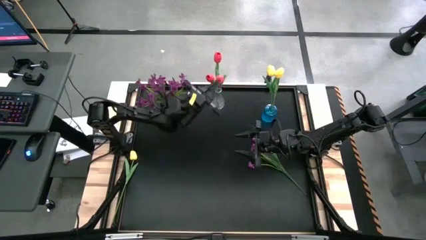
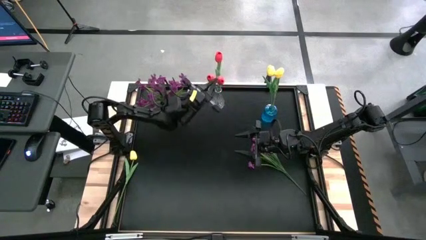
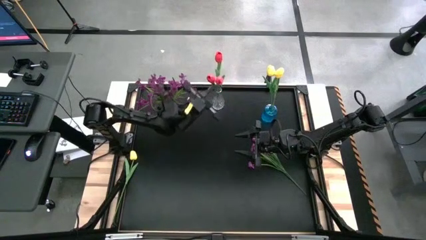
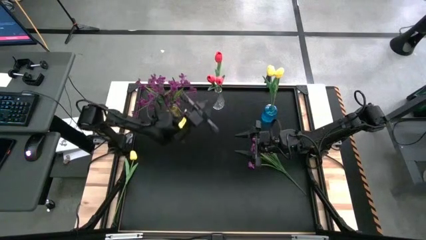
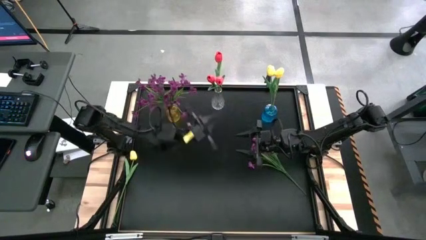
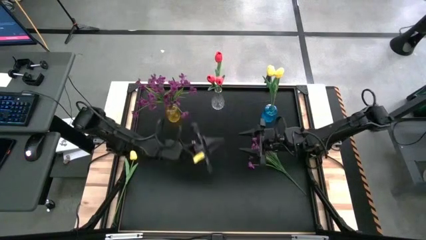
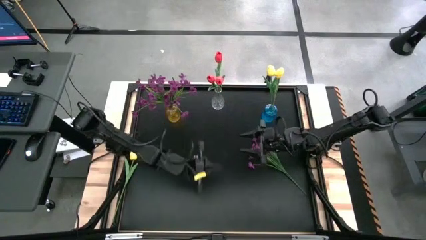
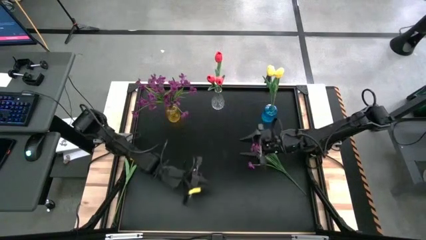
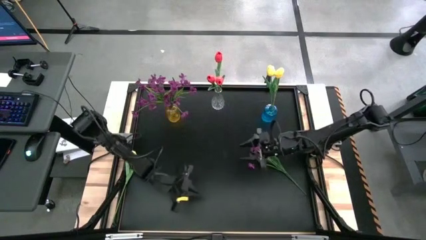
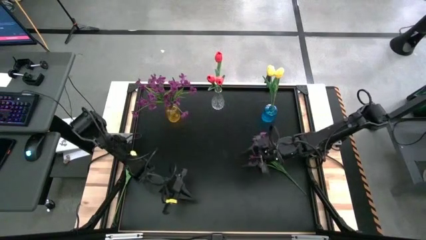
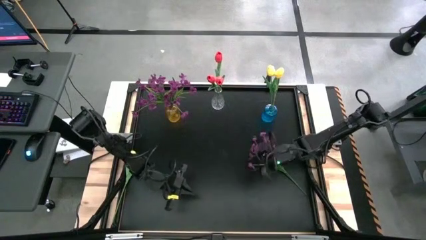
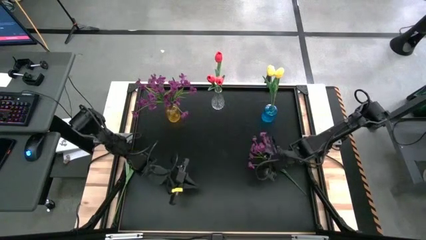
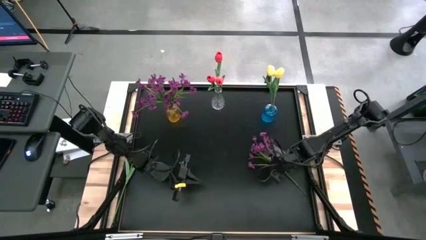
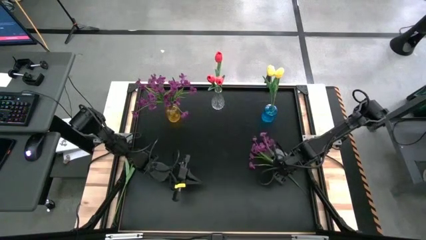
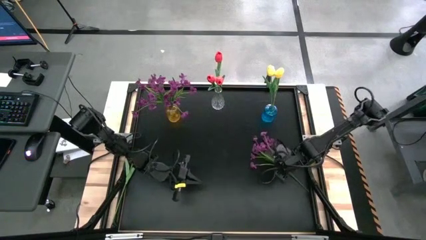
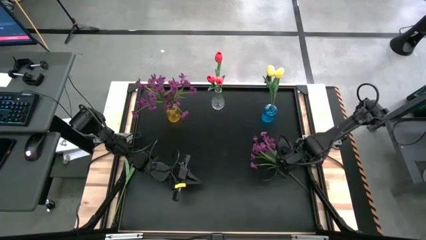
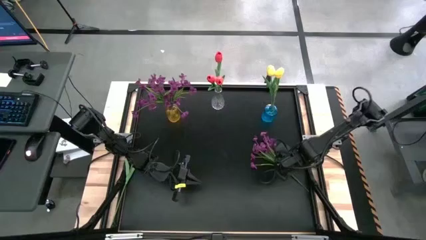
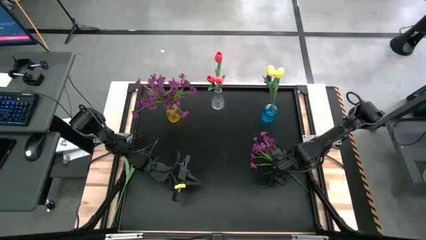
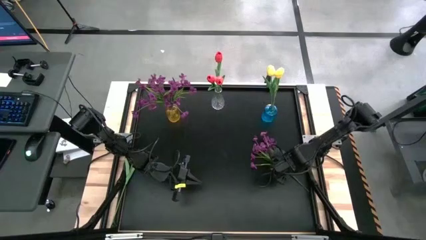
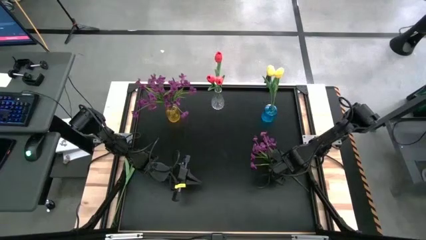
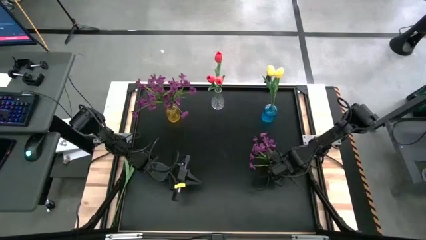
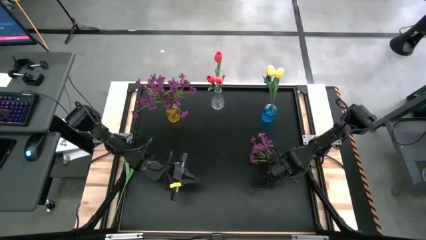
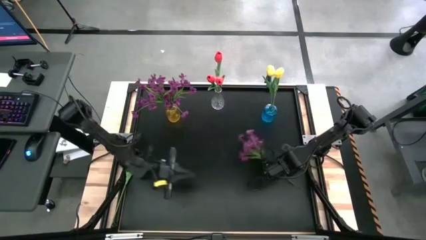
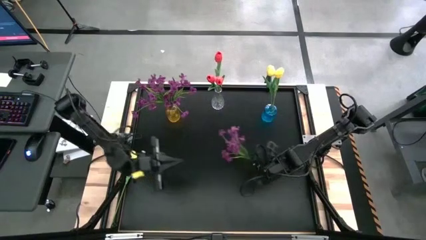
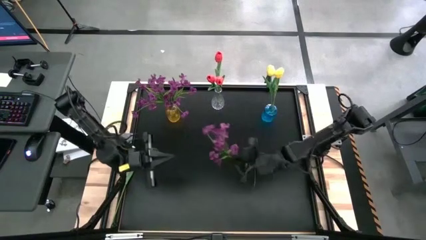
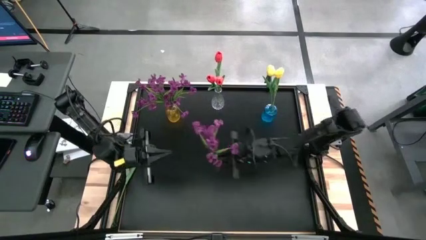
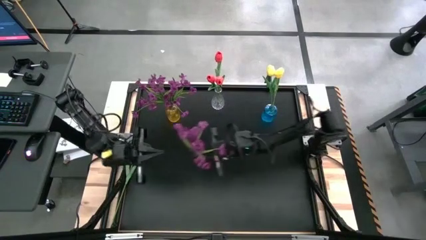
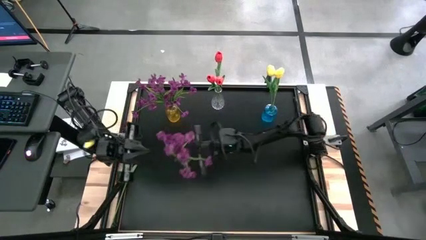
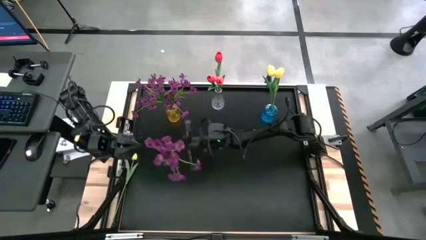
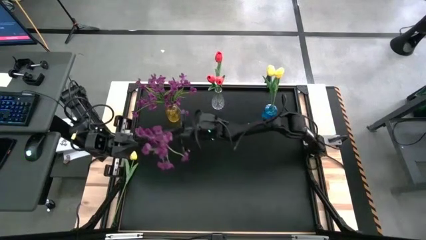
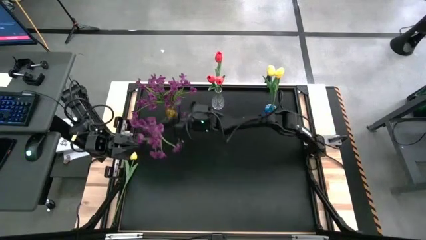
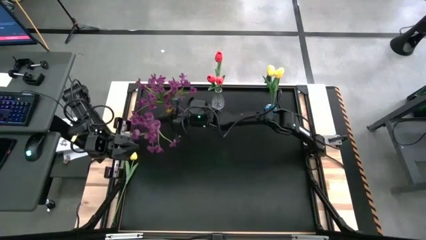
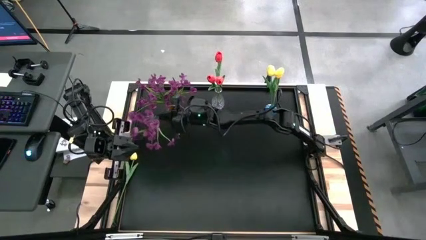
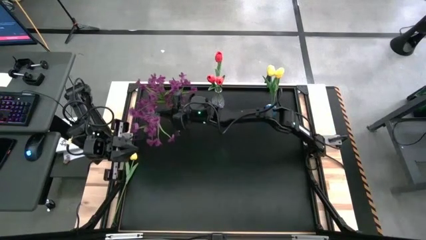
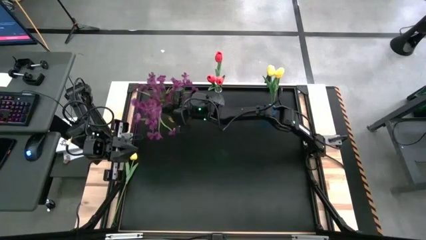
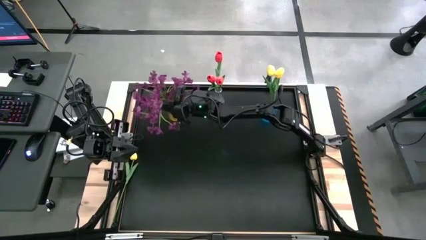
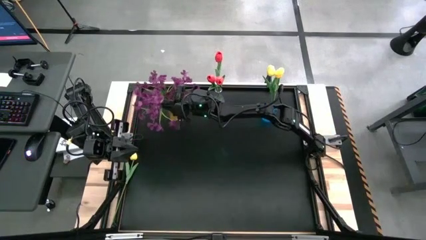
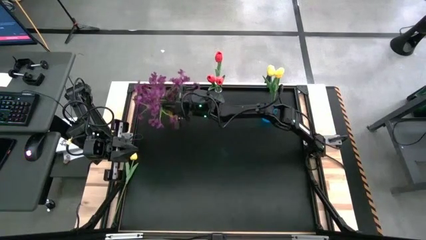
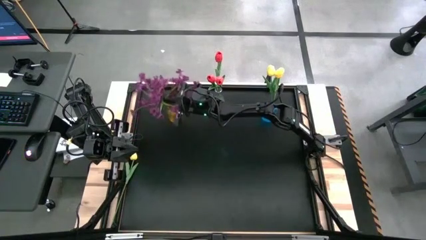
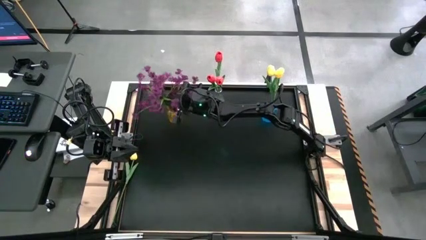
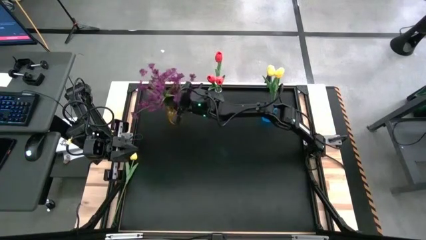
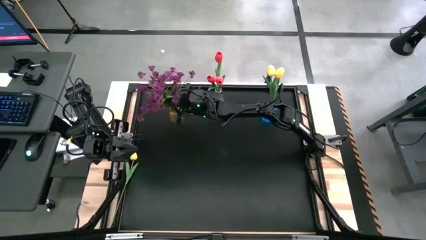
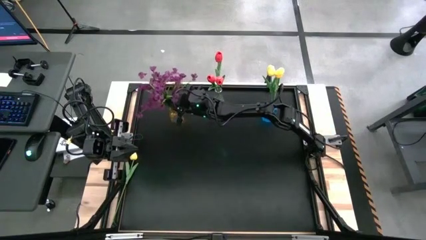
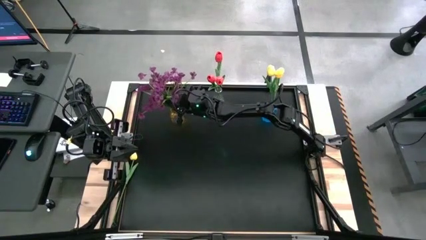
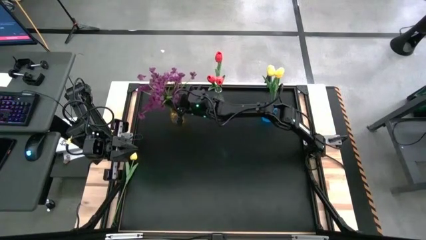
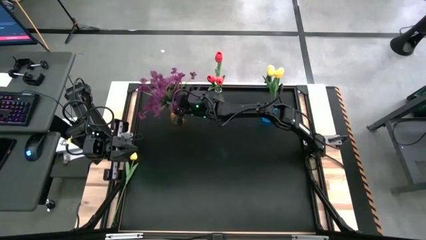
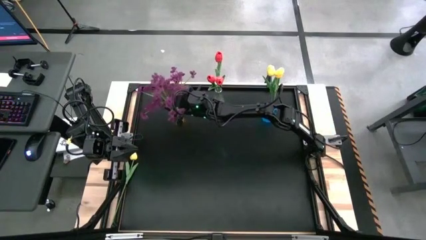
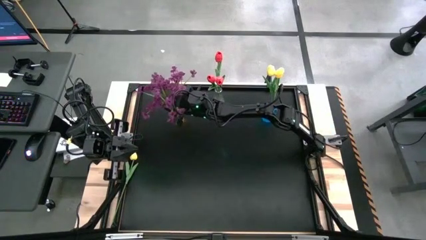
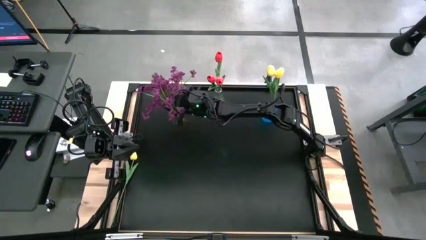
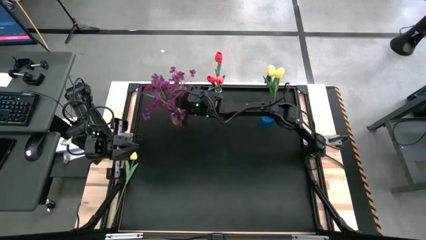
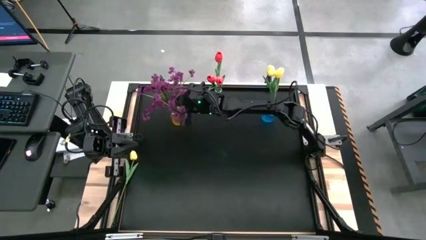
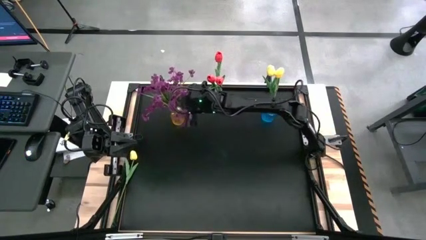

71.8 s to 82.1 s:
Task: Sort flowers into vase by color
Put the purple flowers into the yellow flower vase
